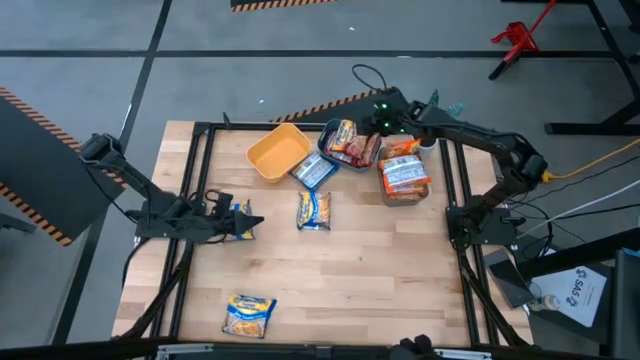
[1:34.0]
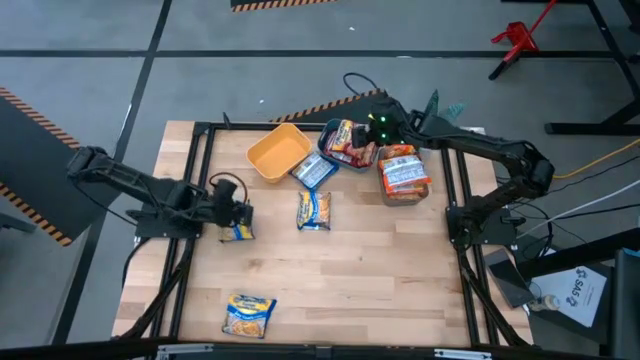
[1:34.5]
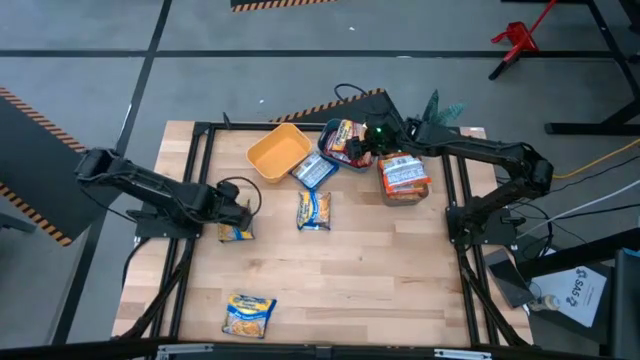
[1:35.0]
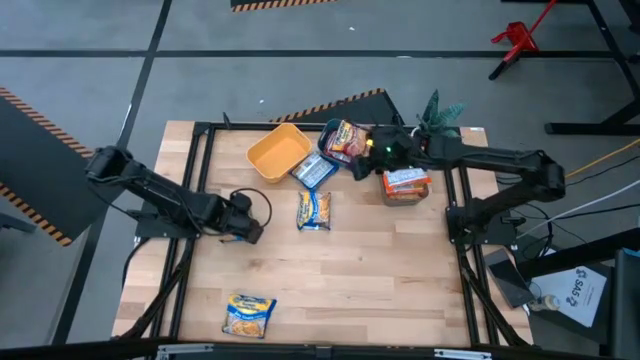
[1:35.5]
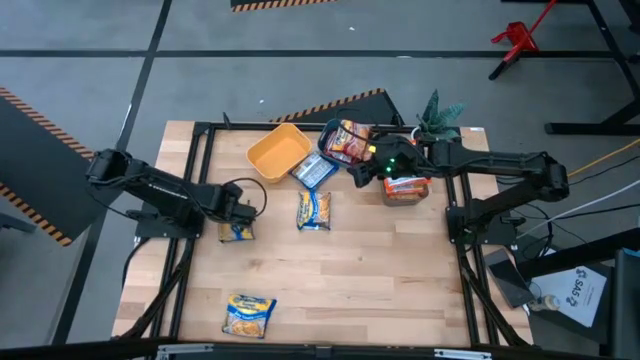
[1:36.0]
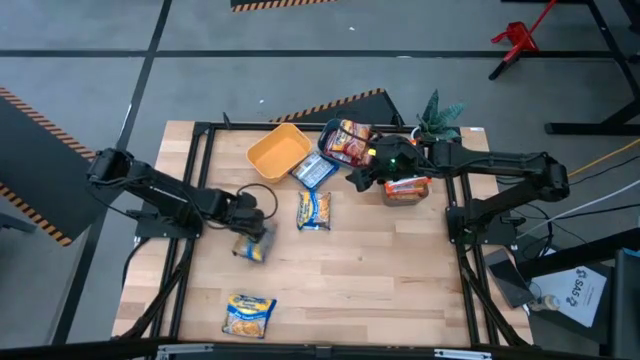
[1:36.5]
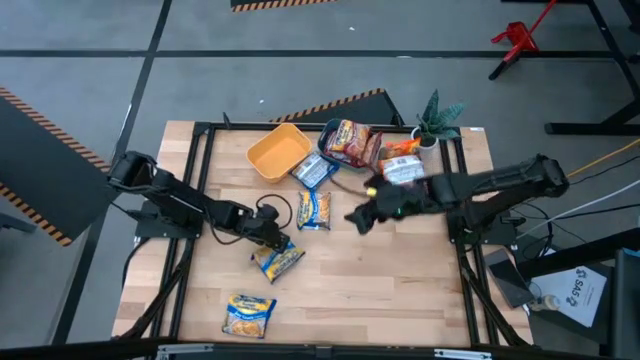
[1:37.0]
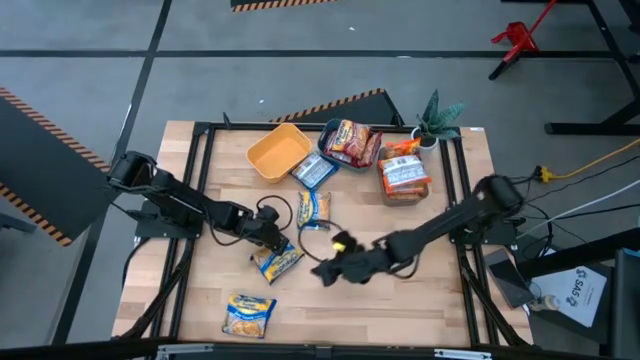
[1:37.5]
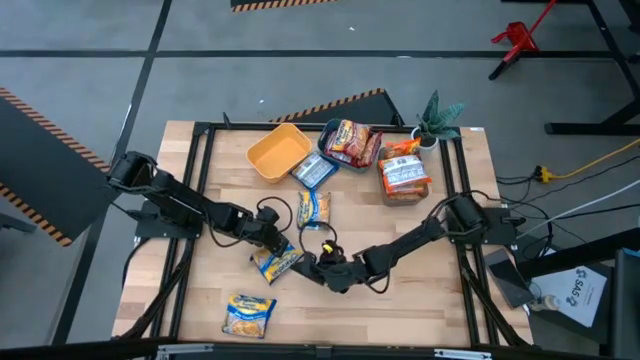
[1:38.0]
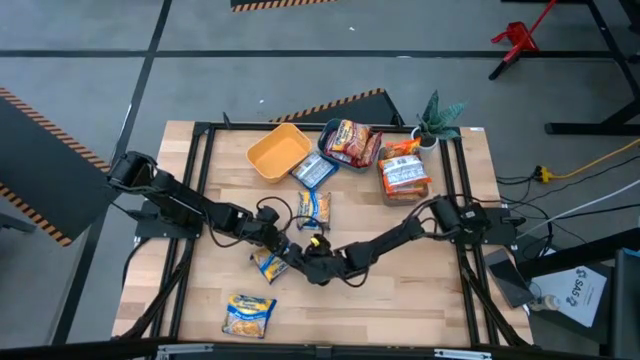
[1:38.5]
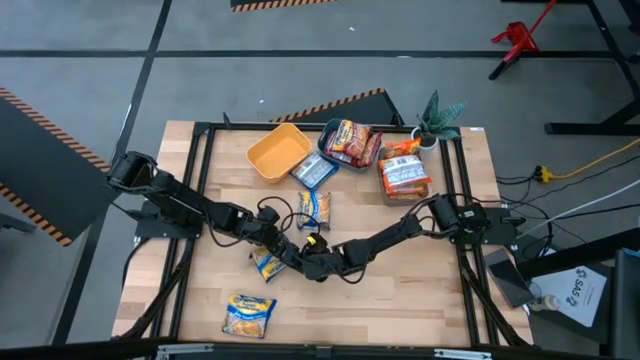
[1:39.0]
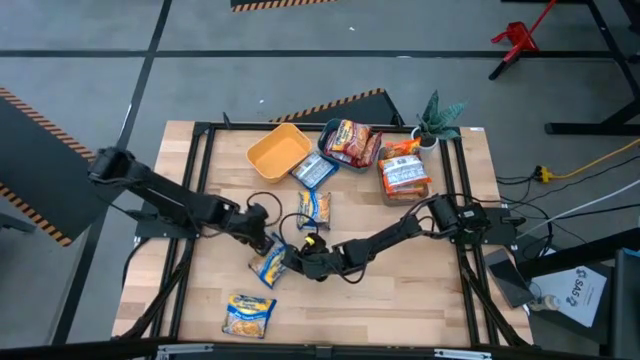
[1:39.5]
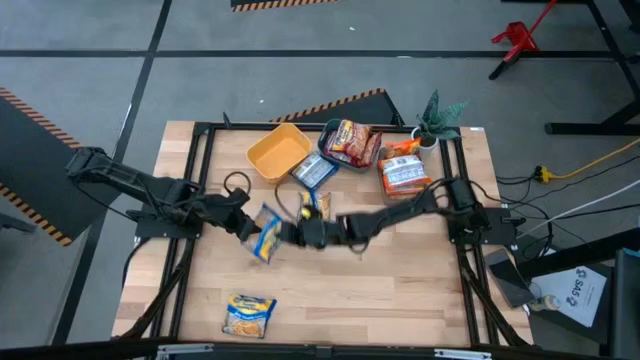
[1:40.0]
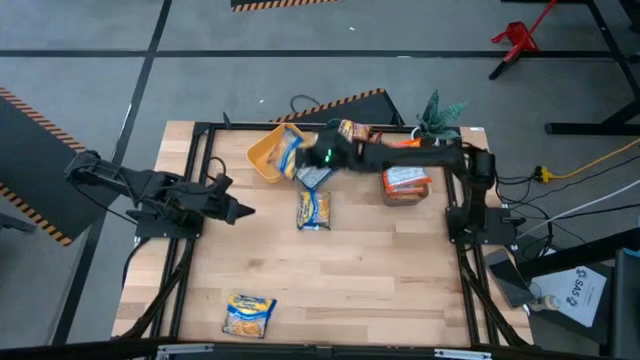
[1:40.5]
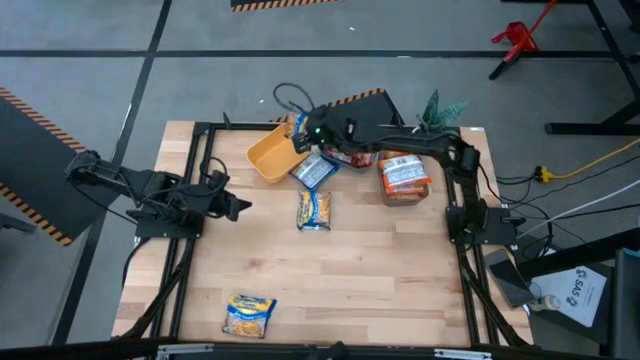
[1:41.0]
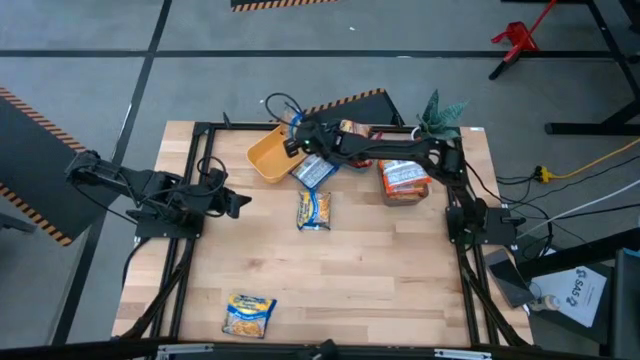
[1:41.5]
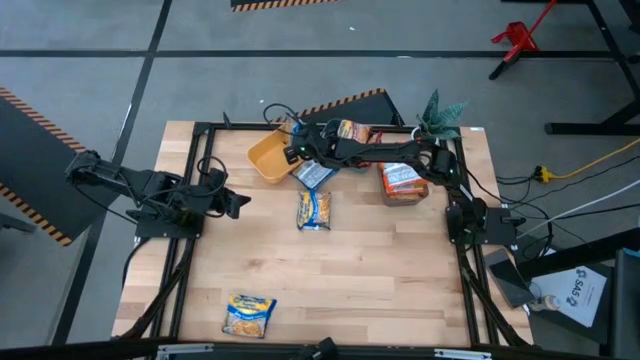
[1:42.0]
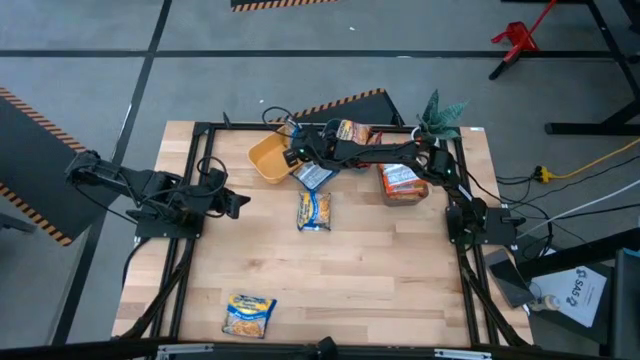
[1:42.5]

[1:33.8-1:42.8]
Task: Sort Maruchan noodles
Put the middle left blue noodle pack into the yellow bin

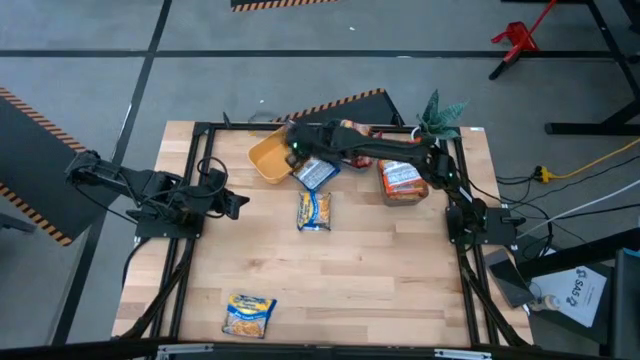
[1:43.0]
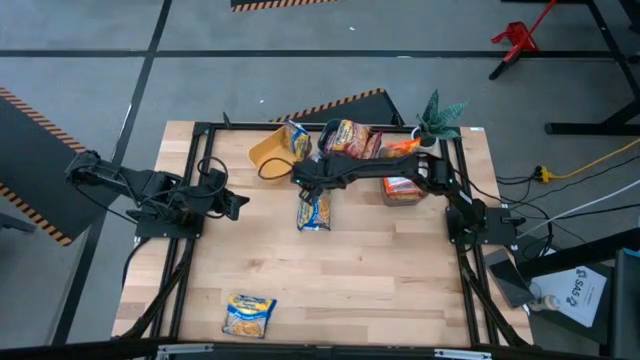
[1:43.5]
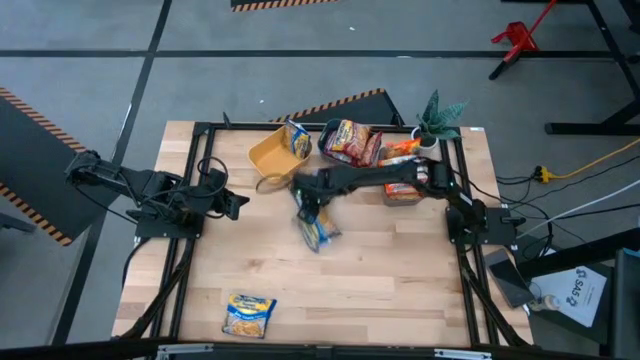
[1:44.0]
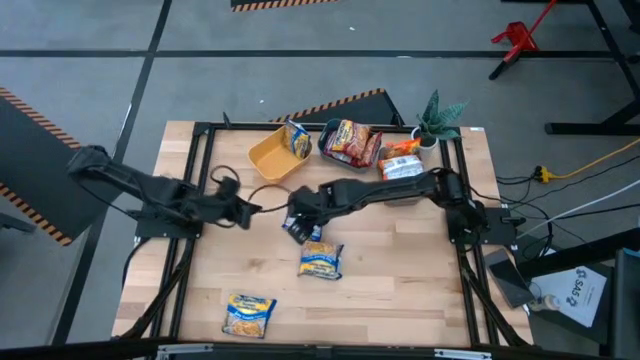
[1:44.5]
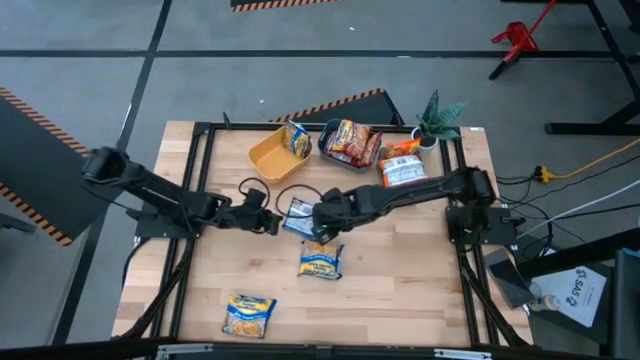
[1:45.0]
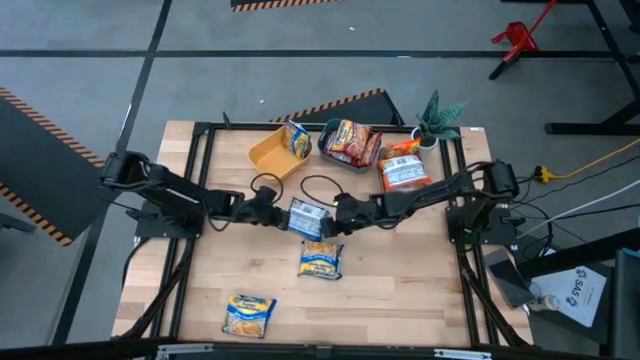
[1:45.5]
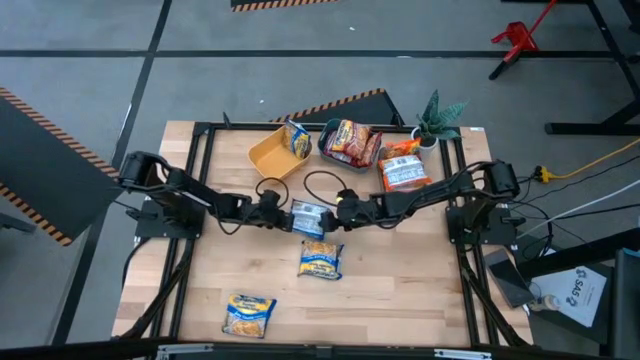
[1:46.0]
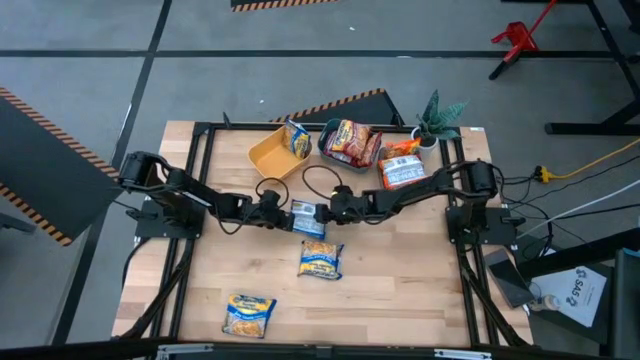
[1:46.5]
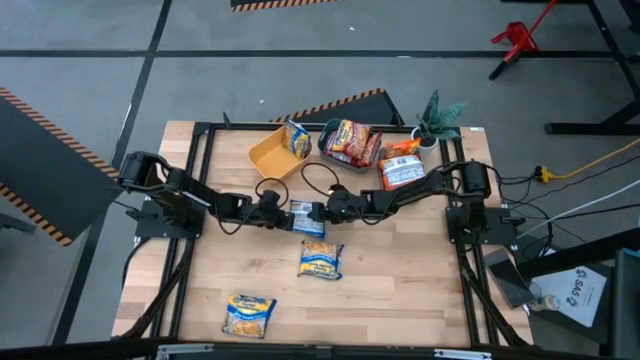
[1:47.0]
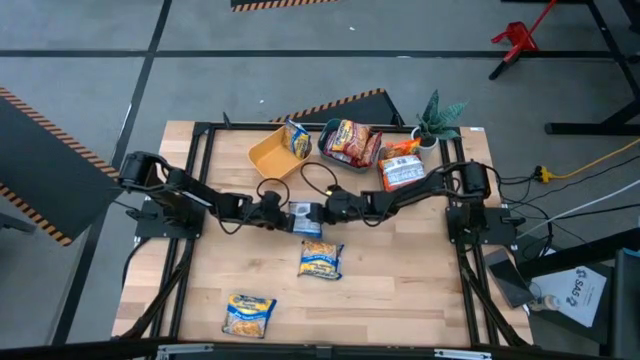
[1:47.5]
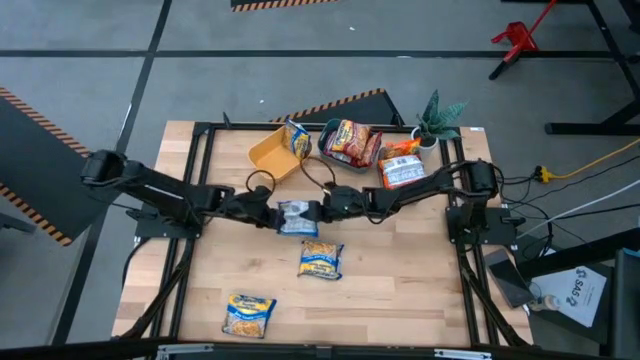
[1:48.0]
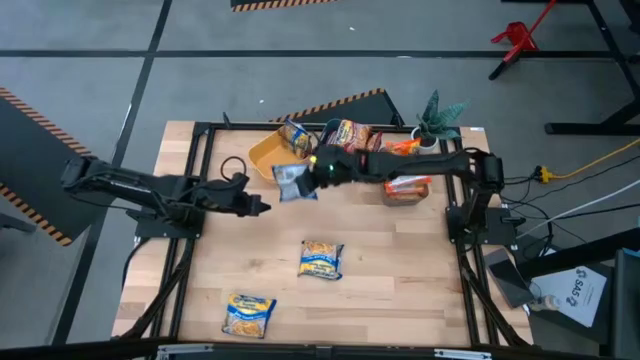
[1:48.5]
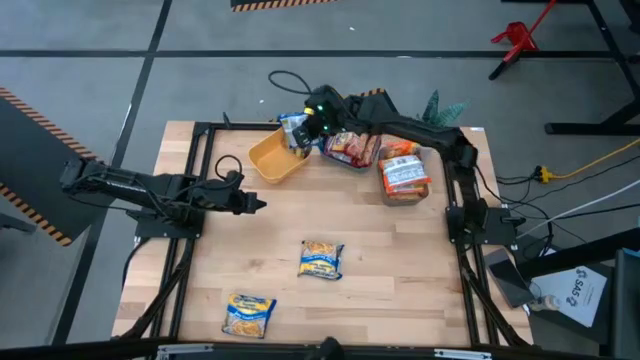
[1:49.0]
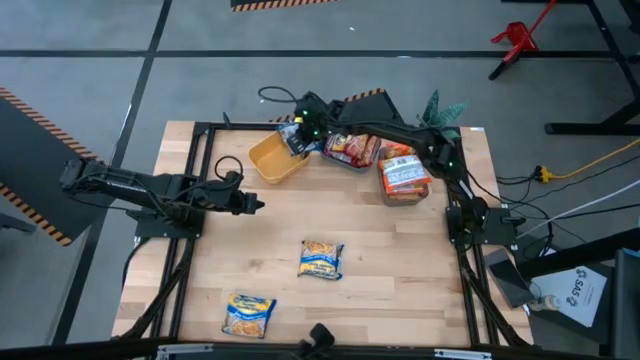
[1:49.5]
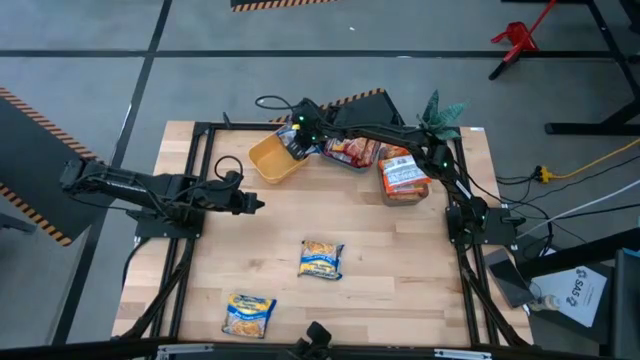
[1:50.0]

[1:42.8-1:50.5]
Put the top blue noodle pack into the yellow bin

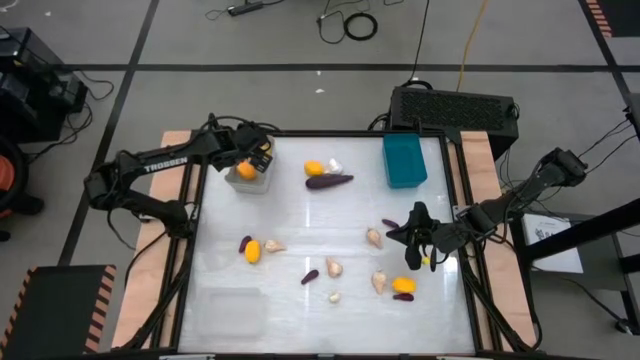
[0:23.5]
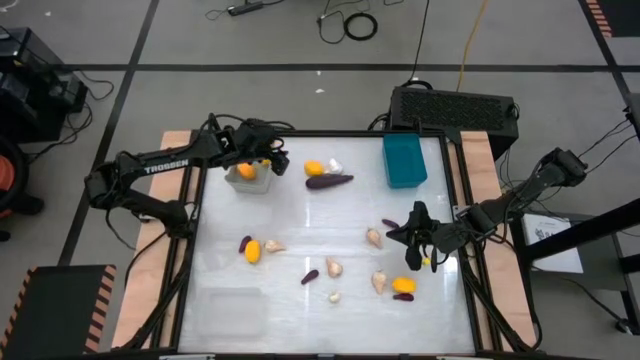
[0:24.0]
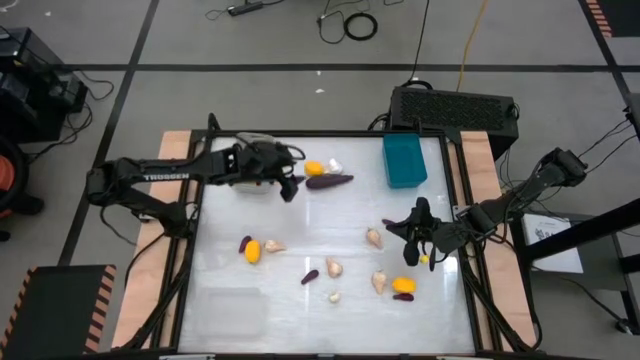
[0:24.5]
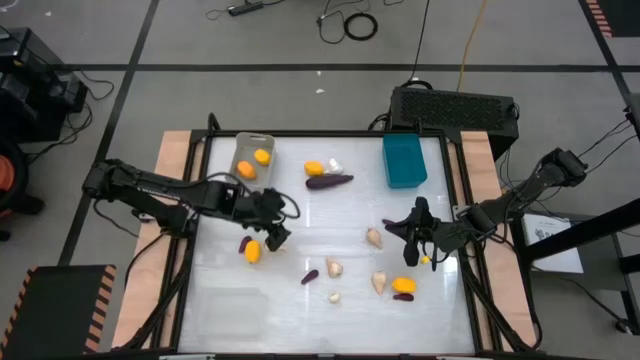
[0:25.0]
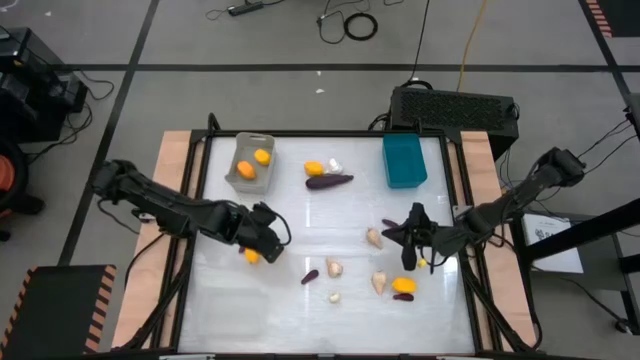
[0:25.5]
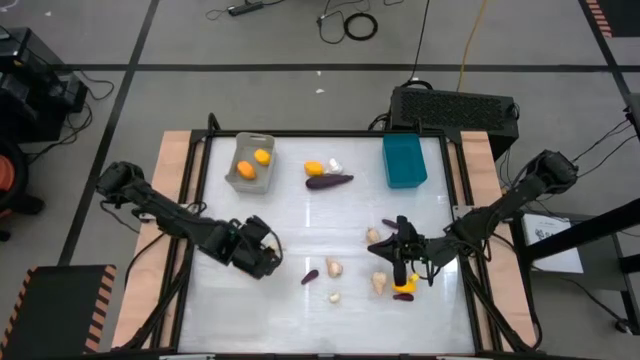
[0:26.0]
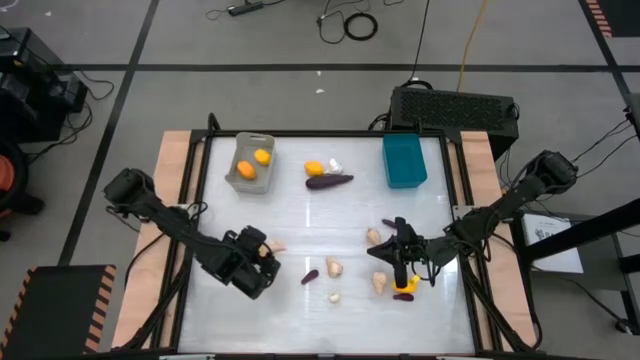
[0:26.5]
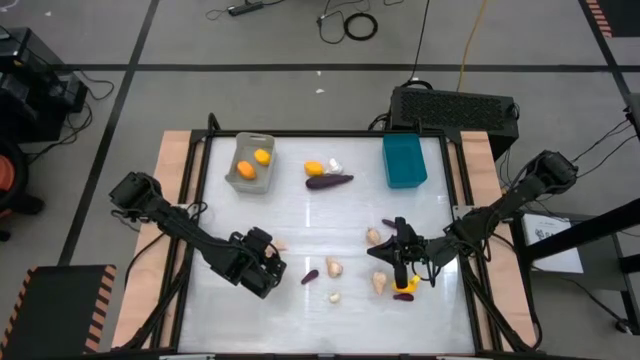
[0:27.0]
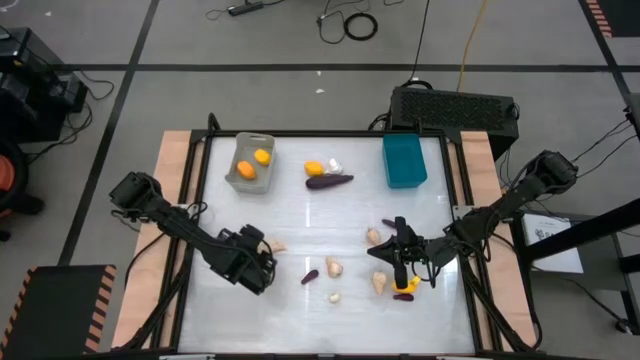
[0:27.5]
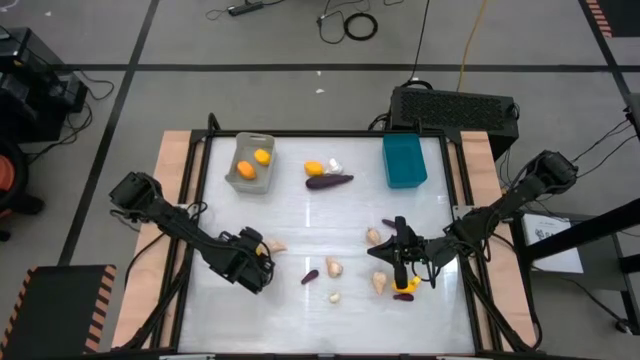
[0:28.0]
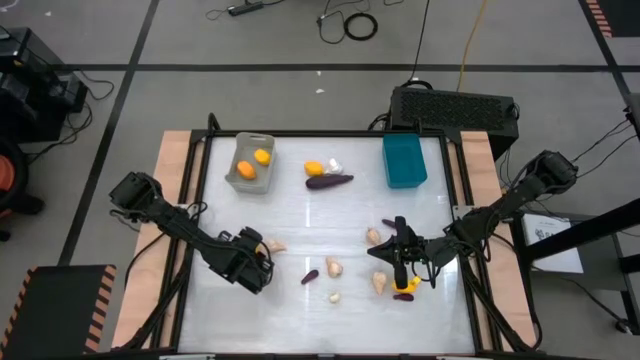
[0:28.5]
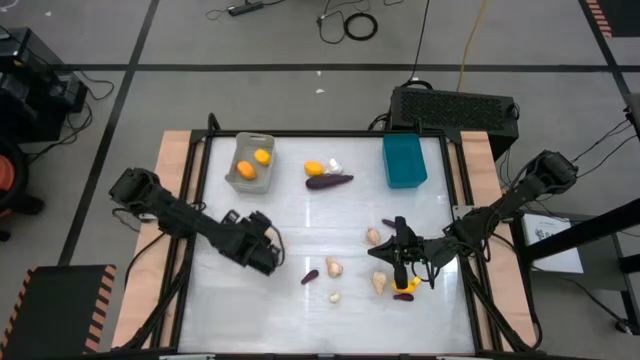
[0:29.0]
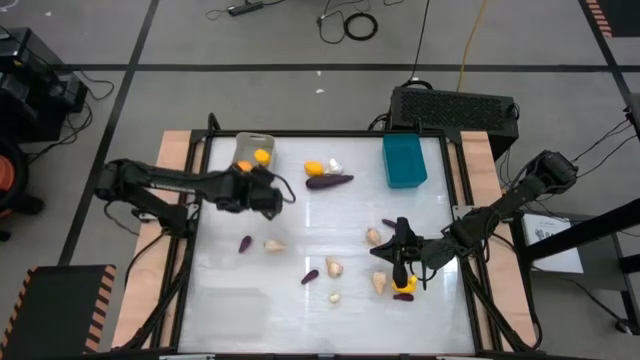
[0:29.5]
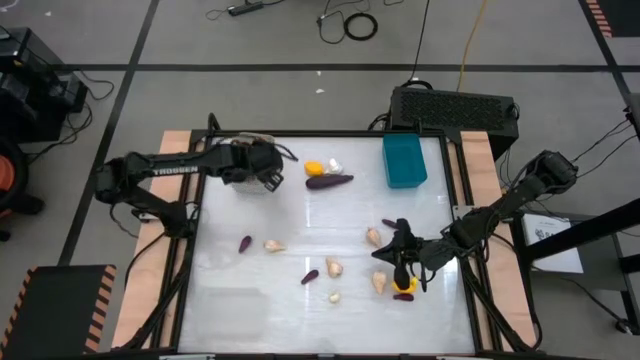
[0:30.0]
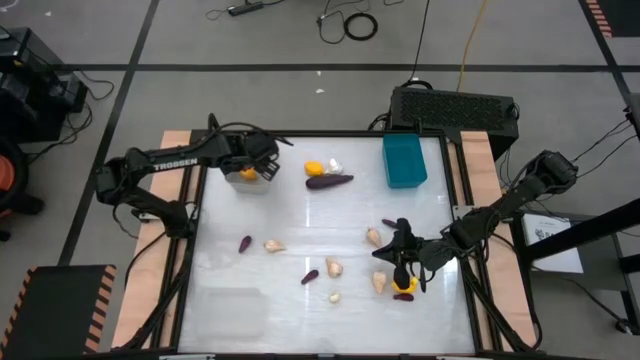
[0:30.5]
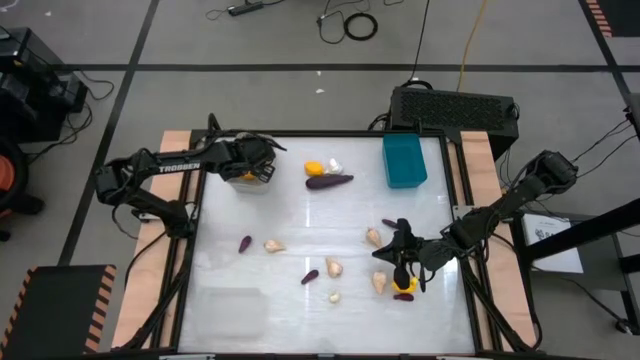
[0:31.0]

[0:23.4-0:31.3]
Task: Sort produce into baskets
Put the lemon into the gray bin
